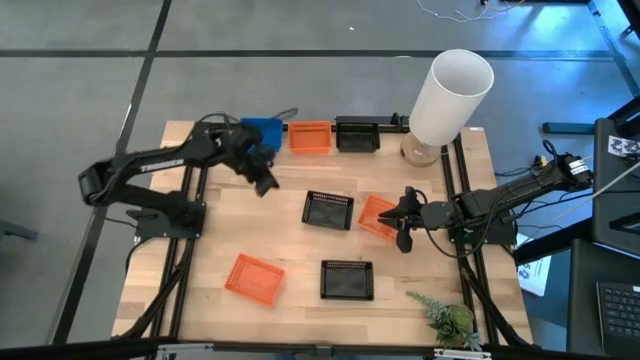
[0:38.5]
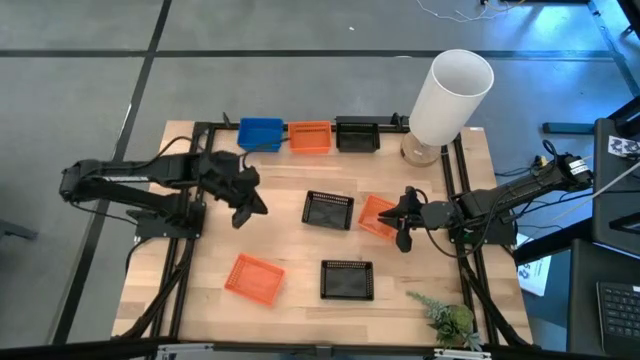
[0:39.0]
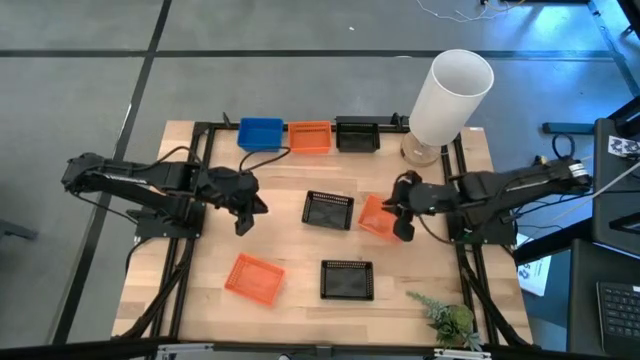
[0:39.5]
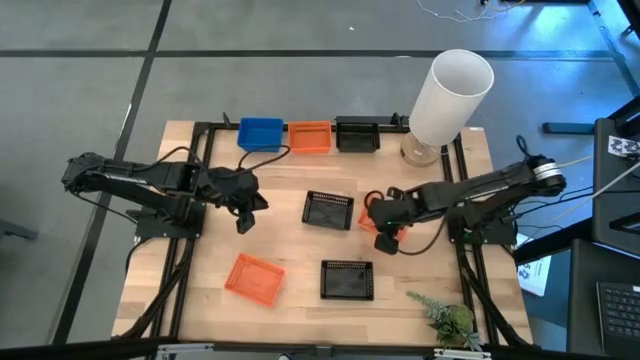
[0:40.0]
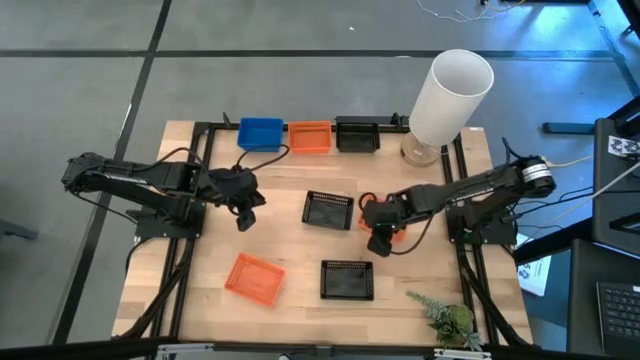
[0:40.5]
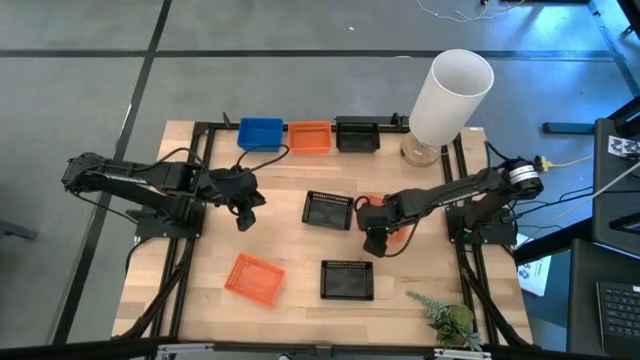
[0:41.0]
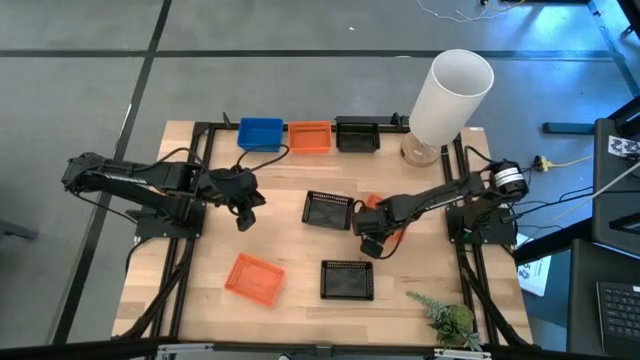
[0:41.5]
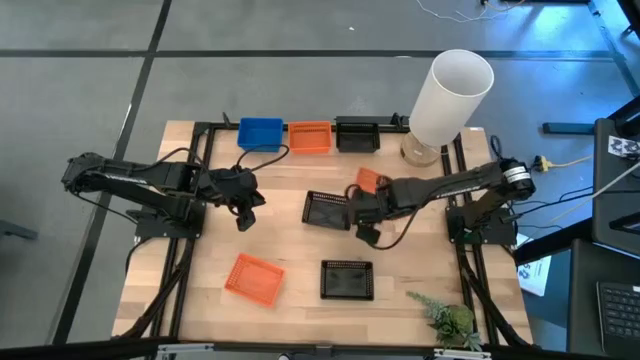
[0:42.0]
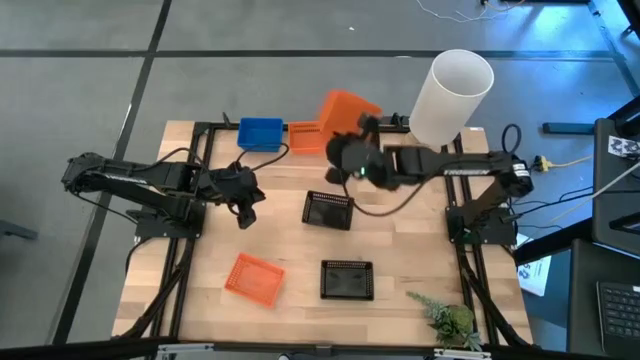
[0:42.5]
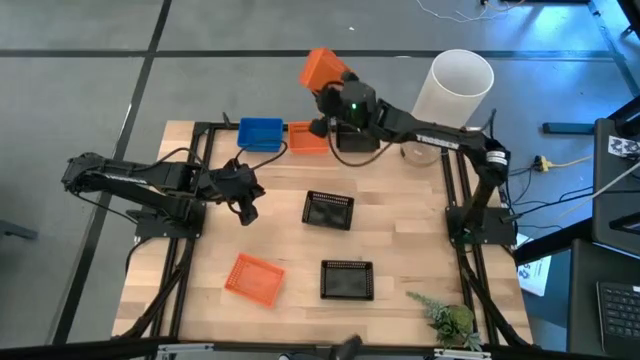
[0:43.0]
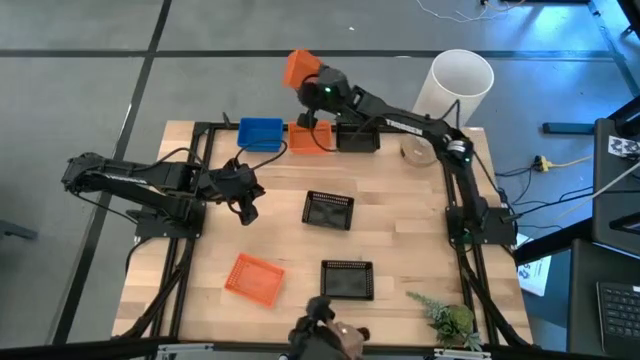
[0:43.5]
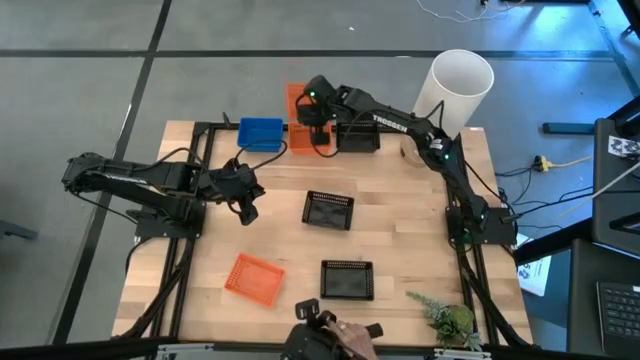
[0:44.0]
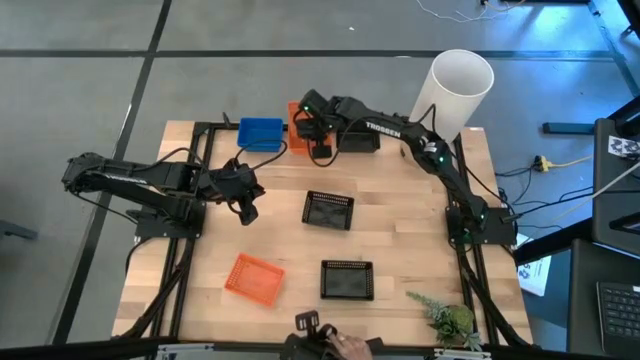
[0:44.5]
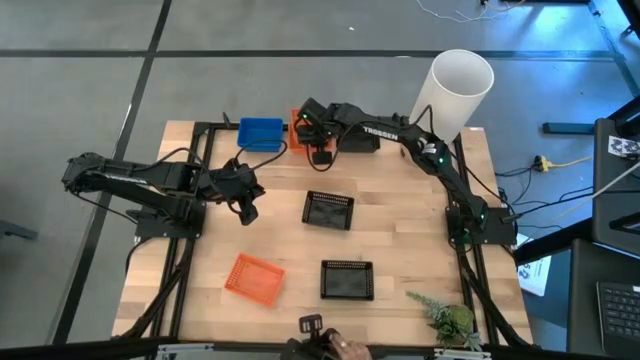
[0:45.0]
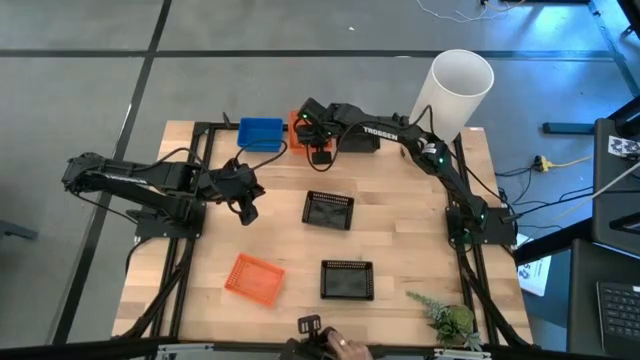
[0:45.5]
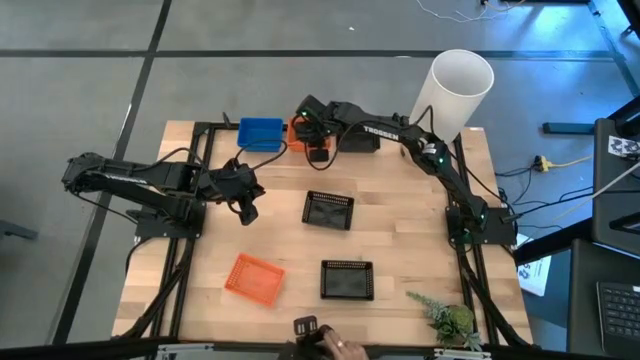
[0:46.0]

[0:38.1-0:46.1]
Stack the middle orange bin on the top orange bin
